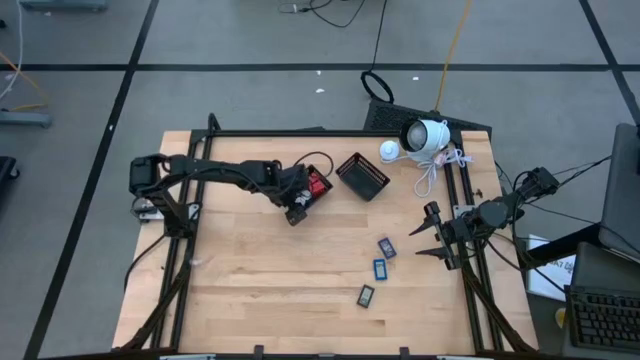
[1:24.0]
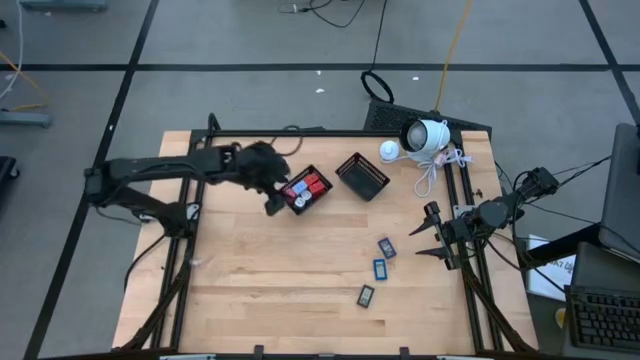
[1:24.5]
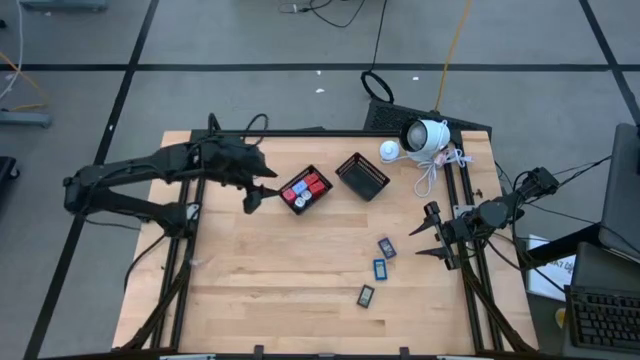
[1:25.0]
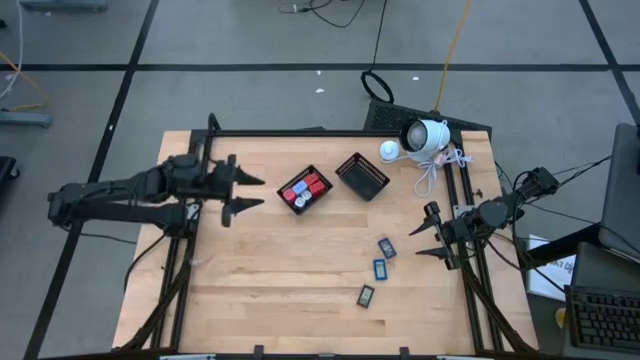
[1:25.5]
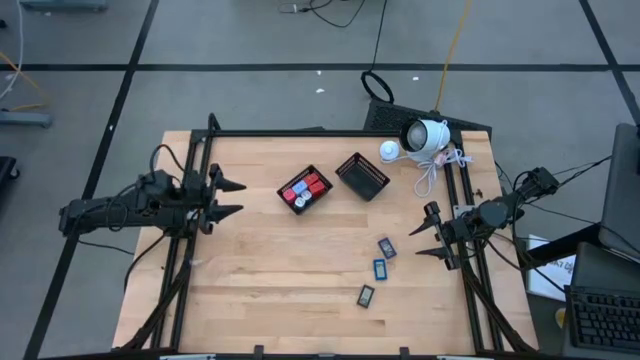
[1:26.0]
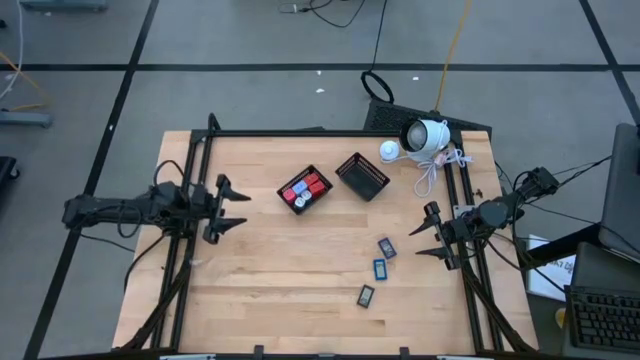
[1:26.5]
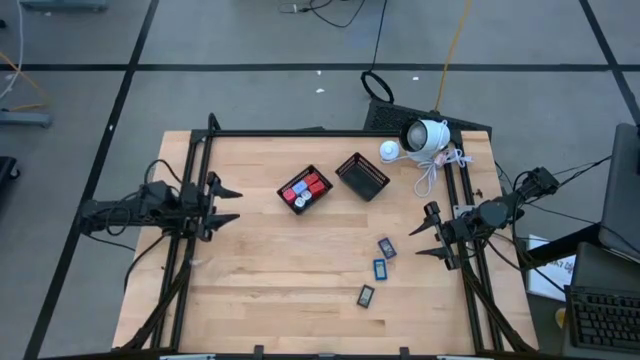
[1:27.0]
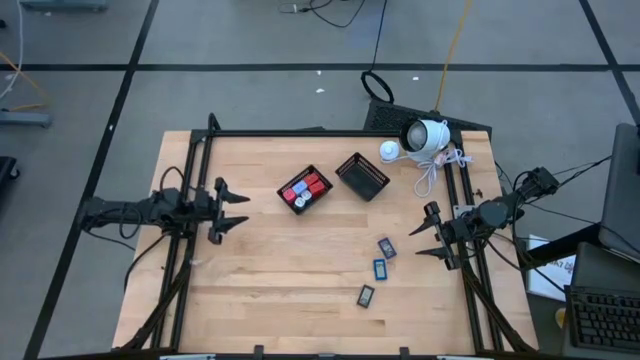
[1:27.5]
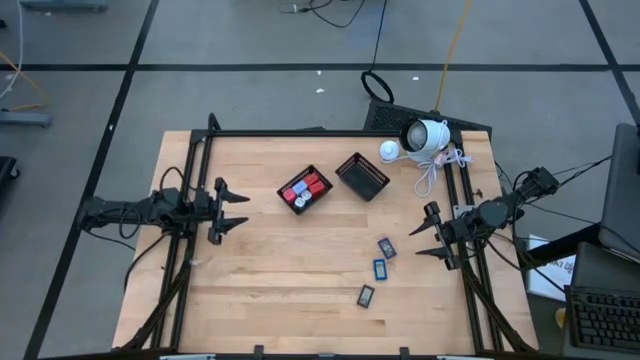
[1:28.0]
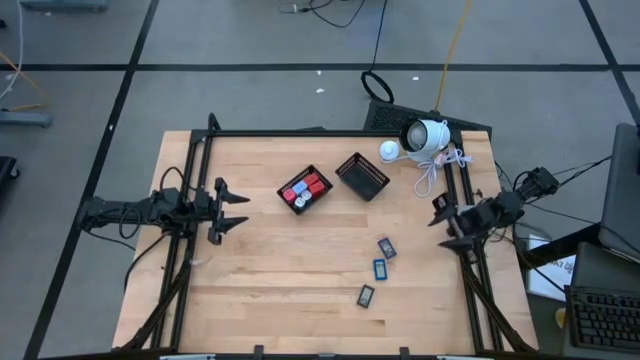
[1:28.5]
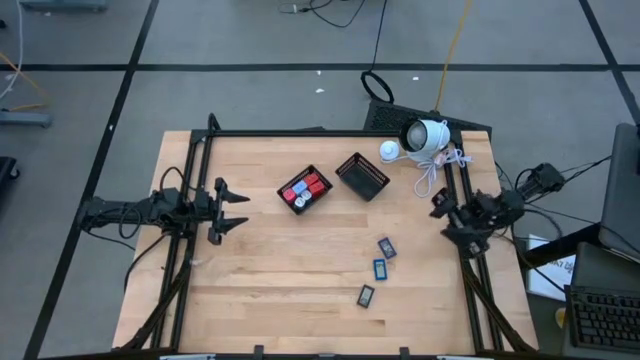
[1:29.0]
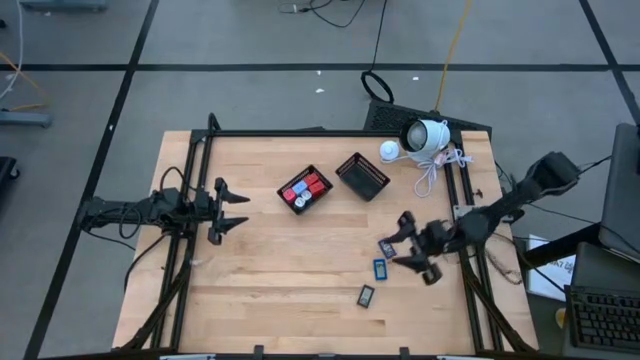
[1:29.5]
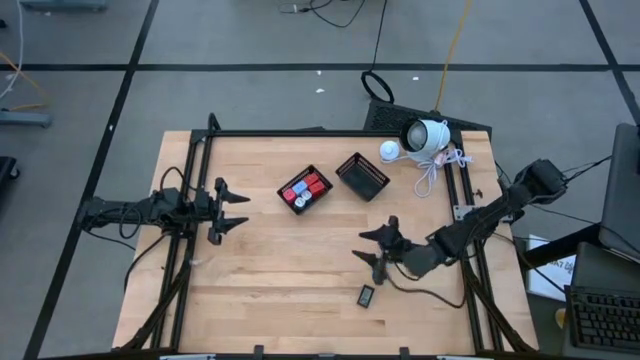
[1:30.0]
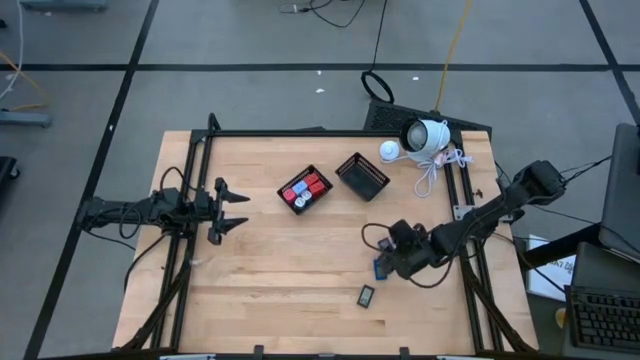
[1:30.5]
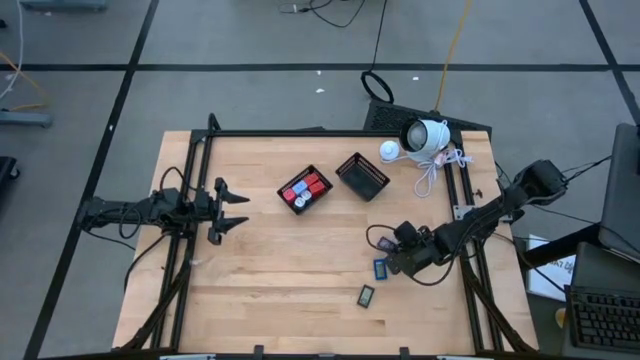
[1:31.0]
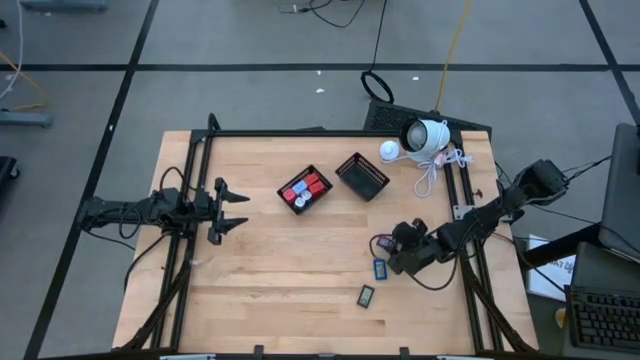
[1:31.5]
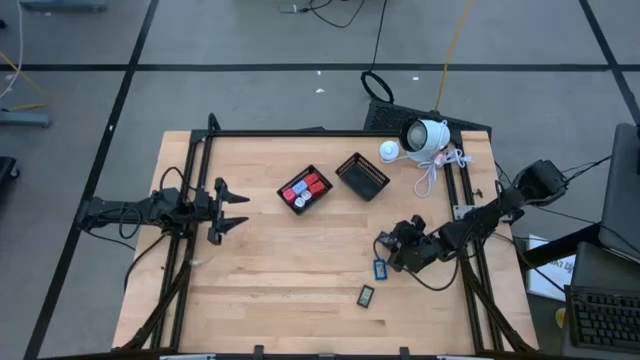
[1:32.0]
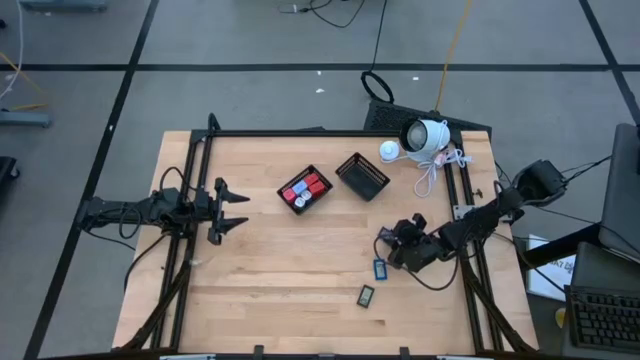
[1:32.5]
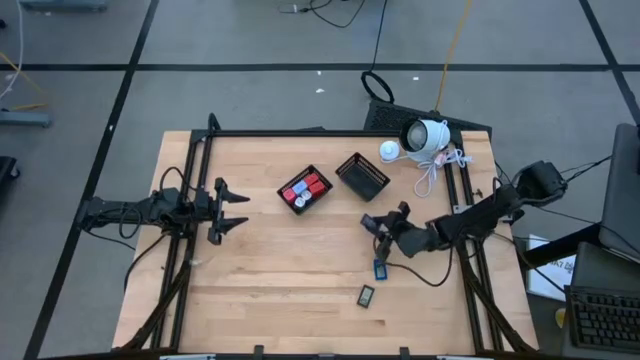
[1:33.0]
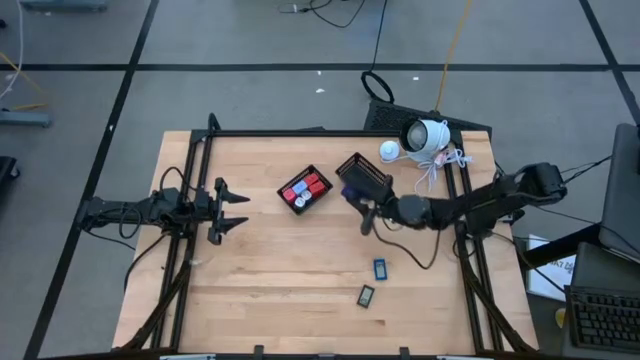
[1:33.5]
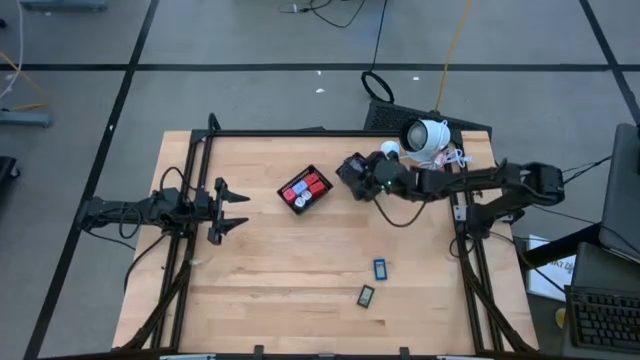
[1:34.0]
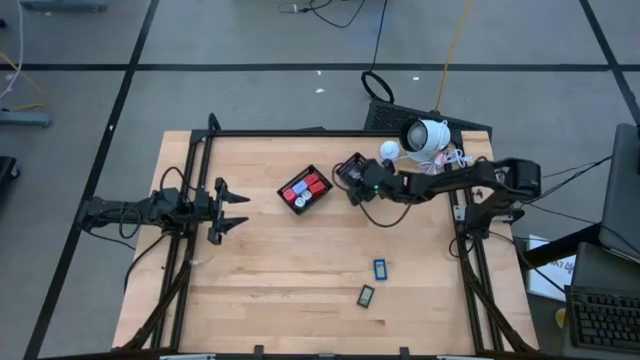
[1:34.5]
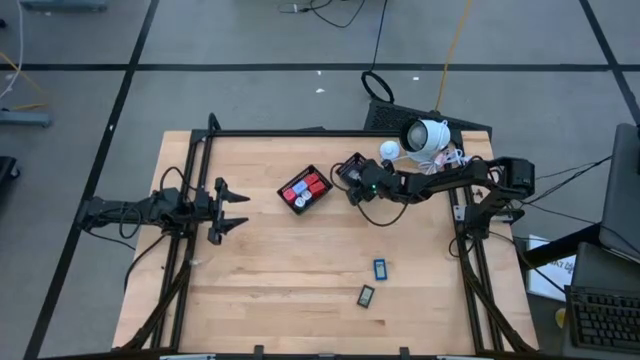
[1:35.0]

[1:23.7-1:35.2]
Task: Pick & Place Office items
Put the violet digital timer into the right black bin

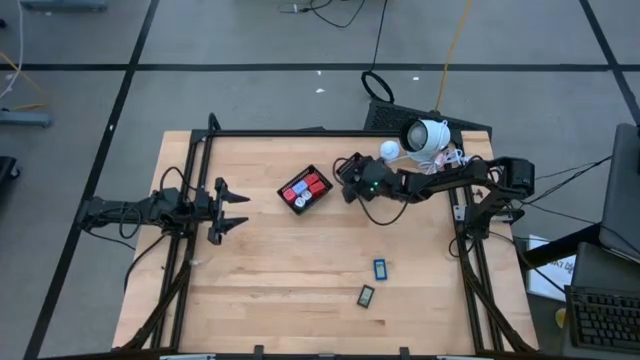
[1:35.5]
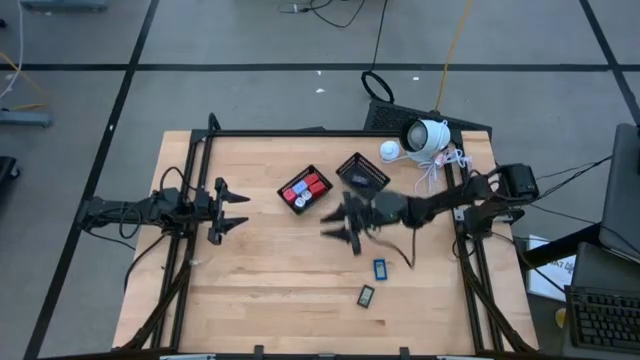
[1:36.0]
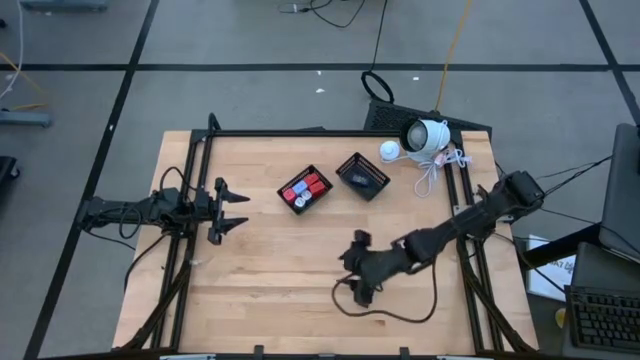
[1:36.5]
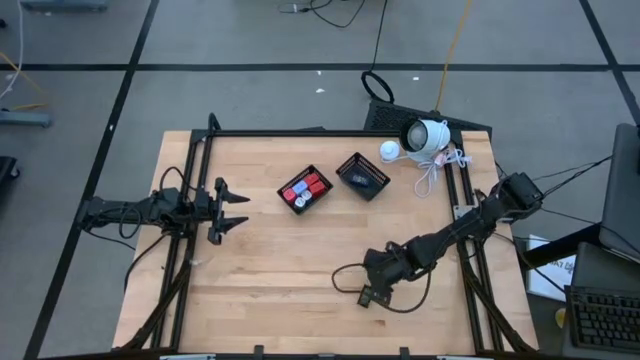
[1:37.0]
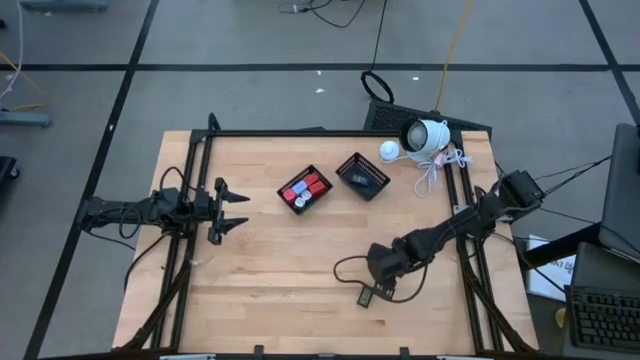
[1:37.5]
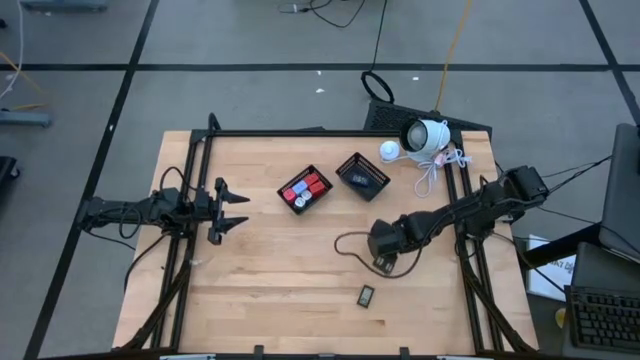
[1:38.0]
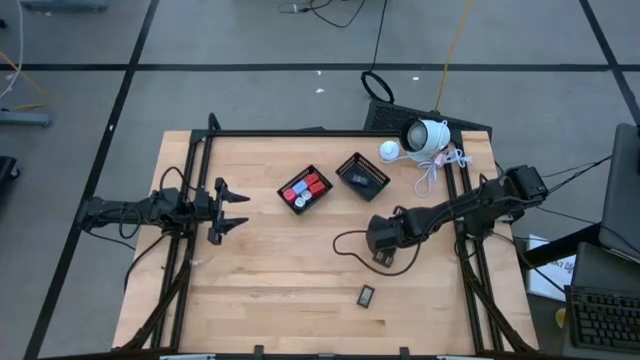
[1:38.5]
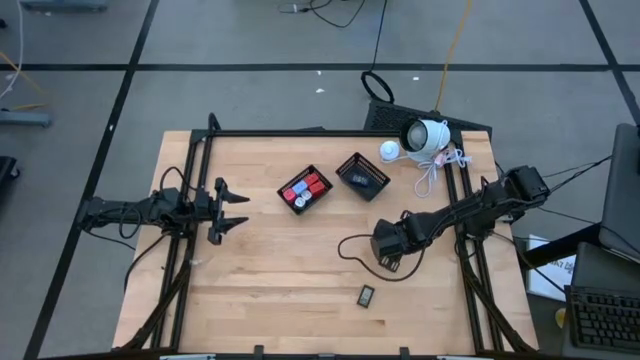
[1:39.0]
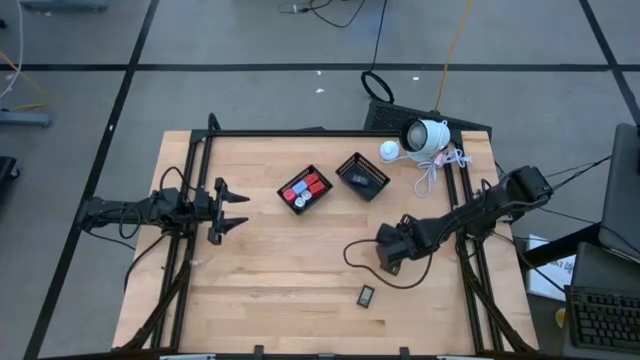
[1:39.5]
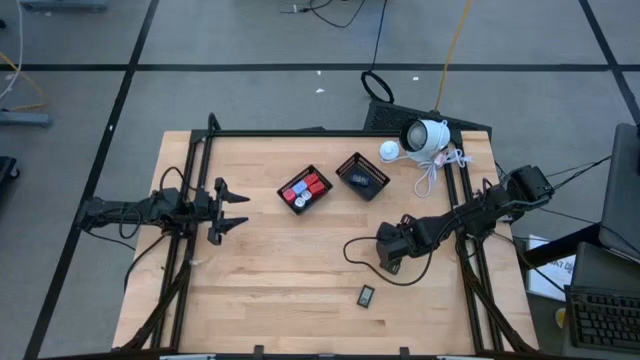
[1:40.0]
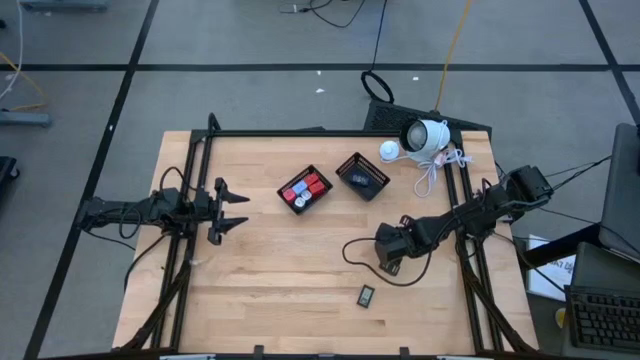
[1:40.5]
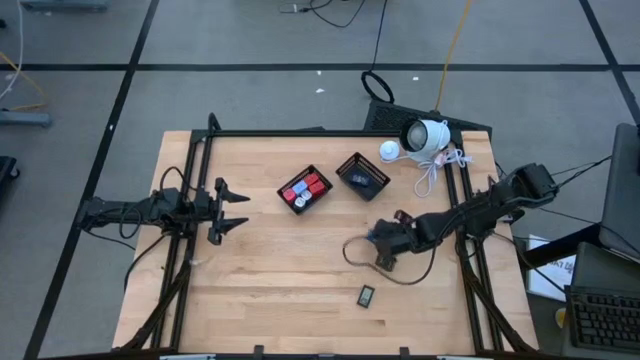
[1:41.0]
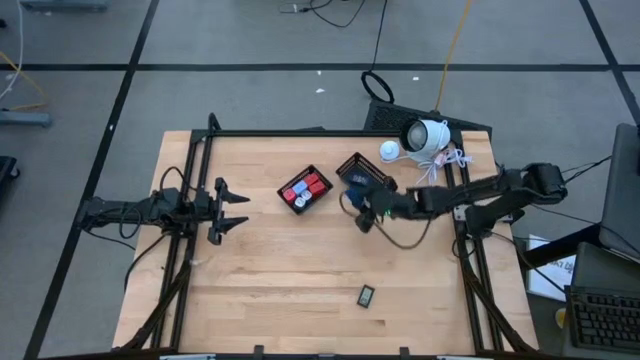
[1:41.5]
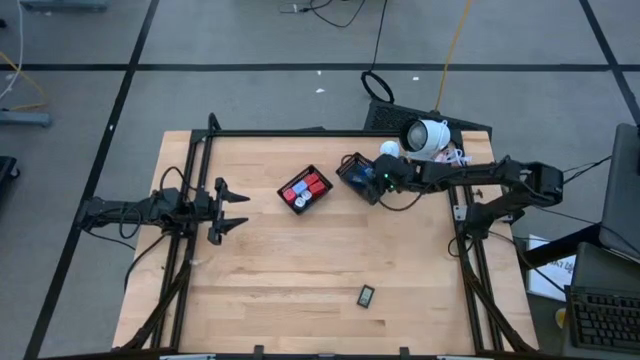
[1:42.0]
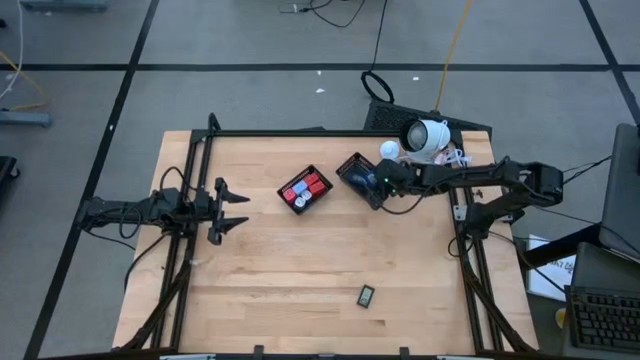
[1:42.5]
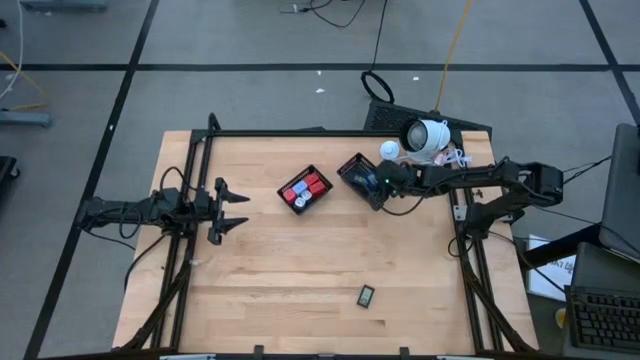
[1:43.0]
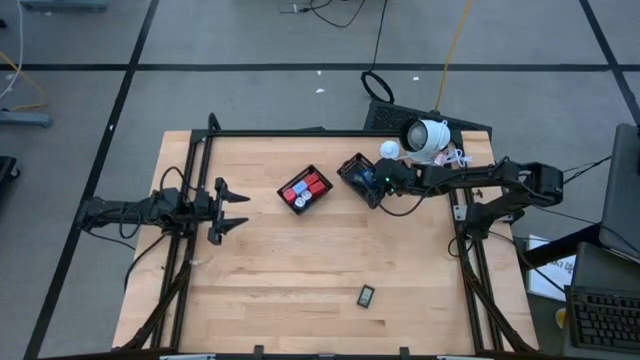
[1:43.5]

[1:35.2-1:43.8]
Put the blue digital timer into the right black bin
